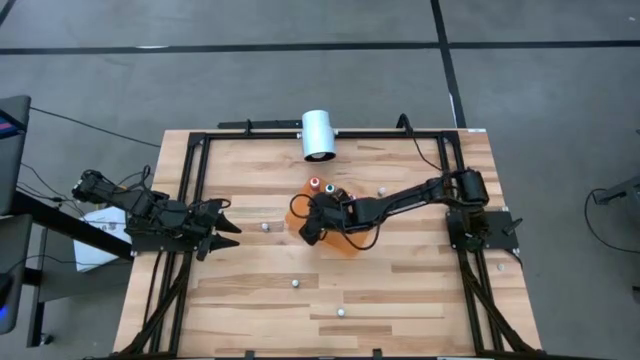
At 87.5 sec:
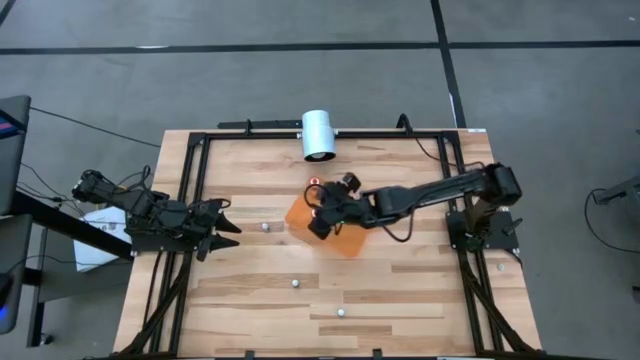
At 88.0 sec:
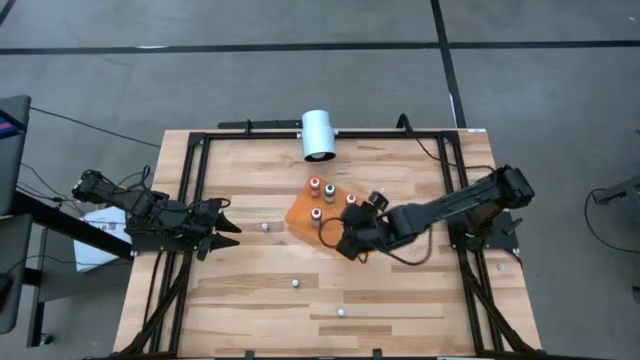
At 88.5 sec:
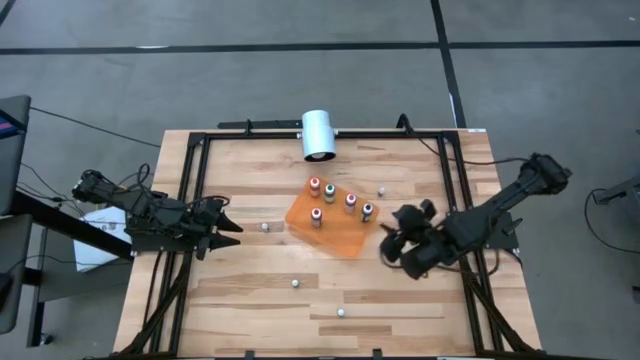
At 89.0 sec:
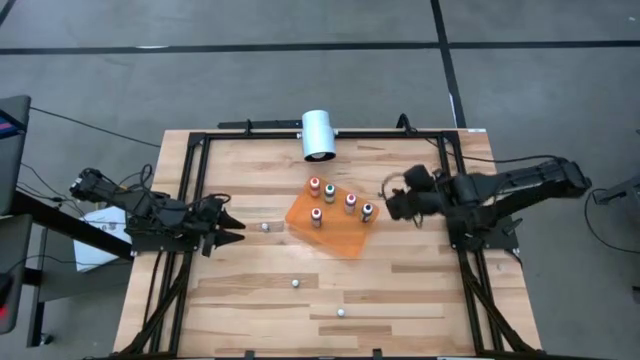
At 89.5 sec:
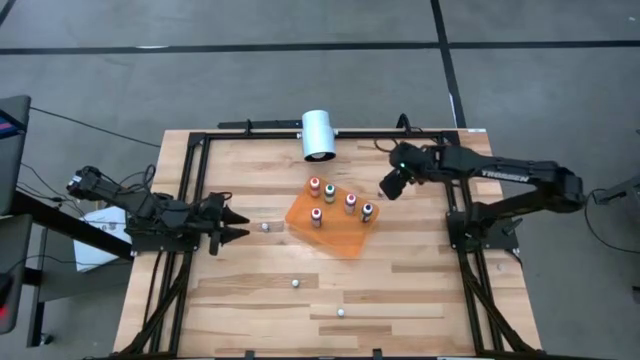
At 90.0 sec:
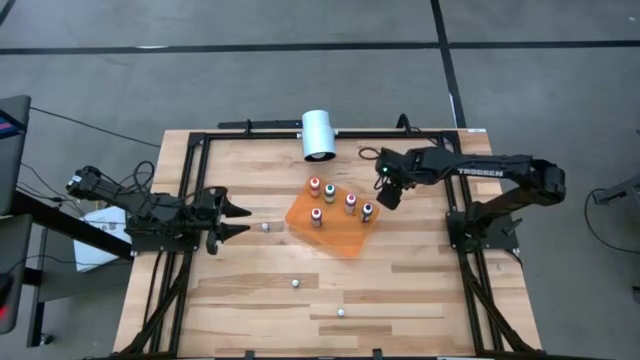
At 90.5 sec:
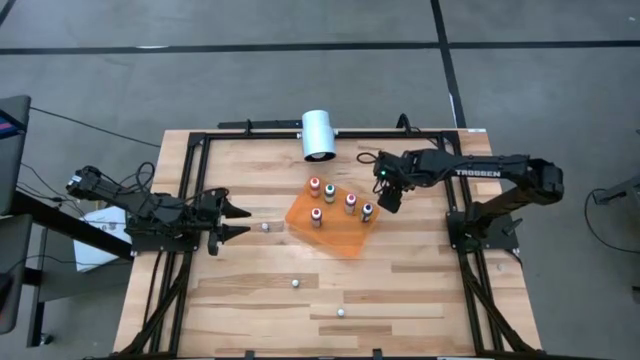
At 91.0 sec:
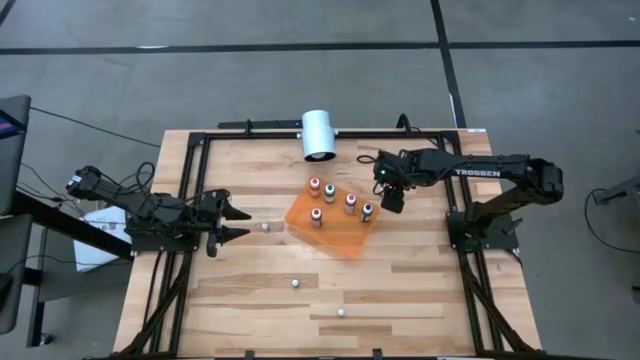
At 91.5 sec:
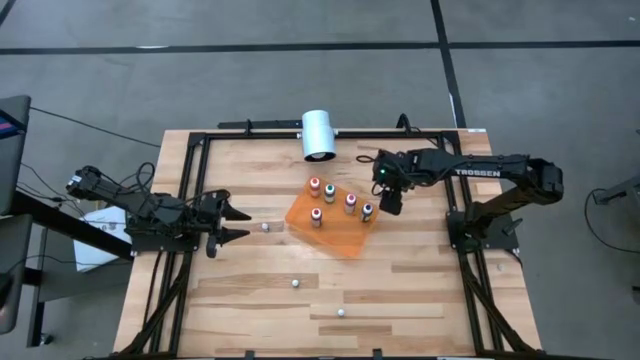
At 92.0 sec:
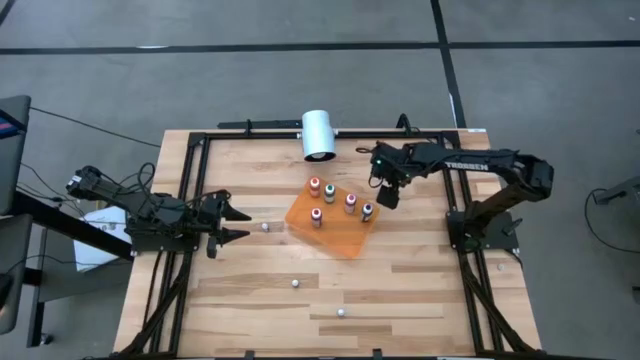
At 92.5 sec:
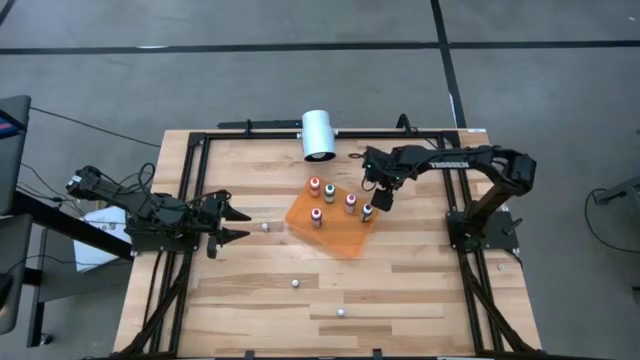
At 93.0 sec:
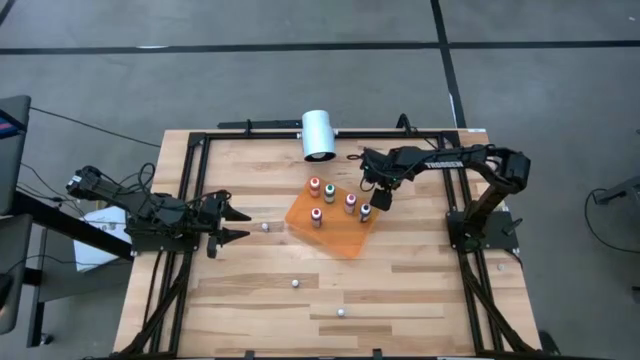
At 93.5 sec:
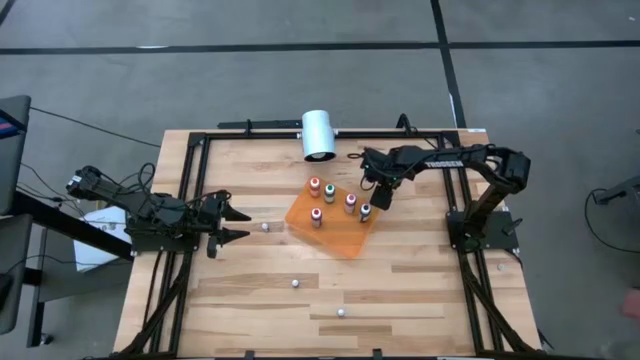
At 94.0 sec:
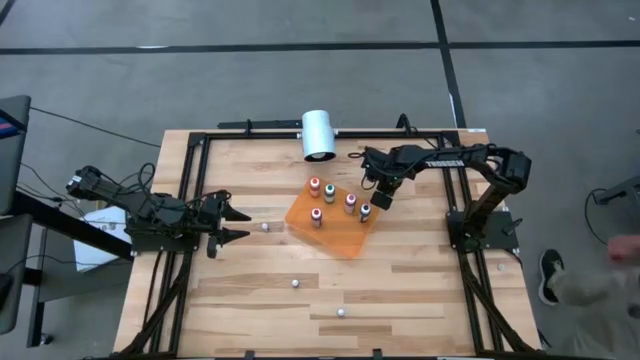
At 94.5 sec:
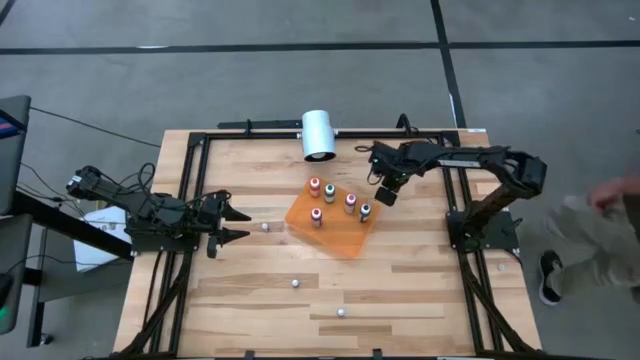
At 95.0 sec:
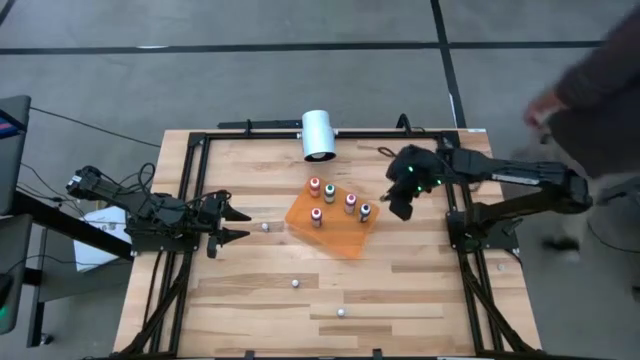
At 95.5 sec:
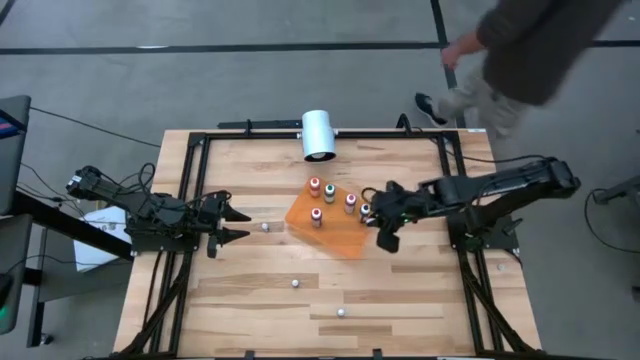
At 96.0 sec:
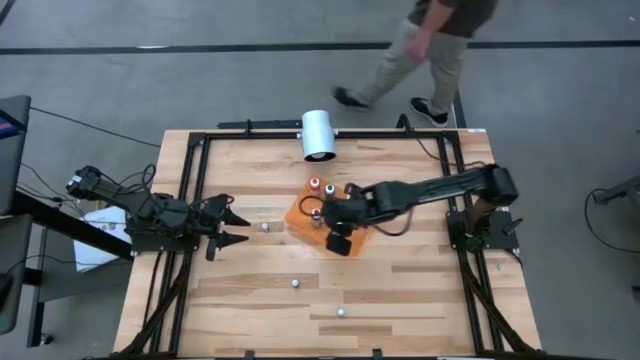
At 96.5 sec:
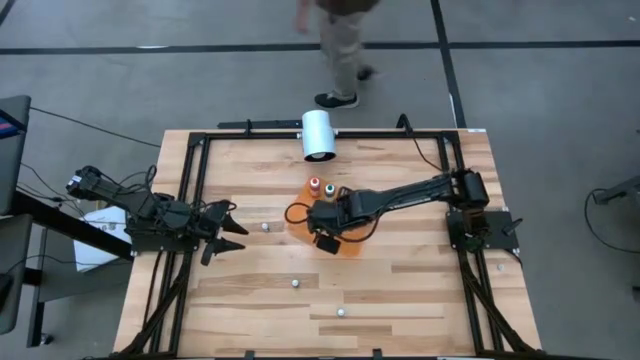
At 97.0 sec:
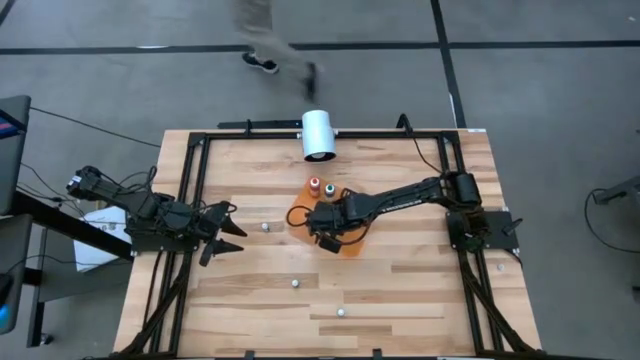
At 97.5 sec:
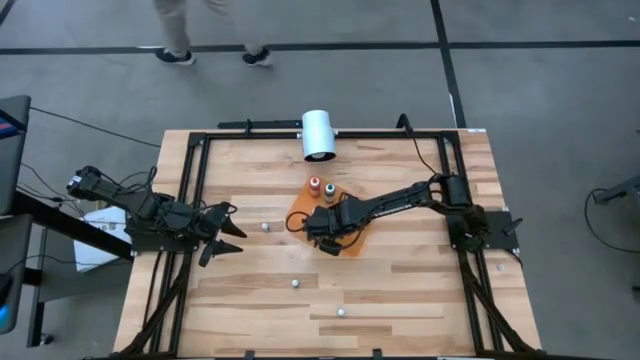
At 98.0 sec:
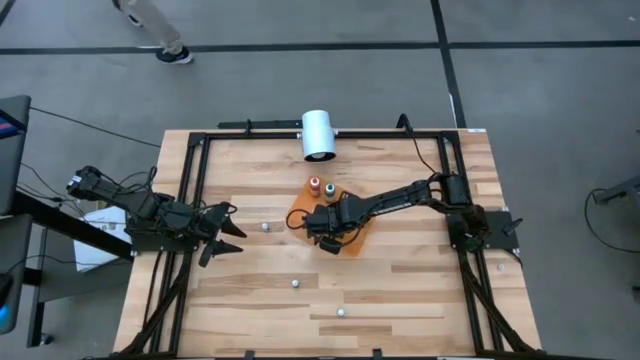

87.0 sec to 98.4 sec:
Task: Pick & Place food coloring
Put the top small green food coloring bottle into the bin

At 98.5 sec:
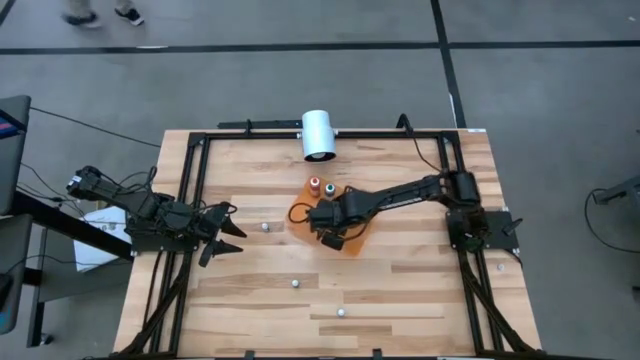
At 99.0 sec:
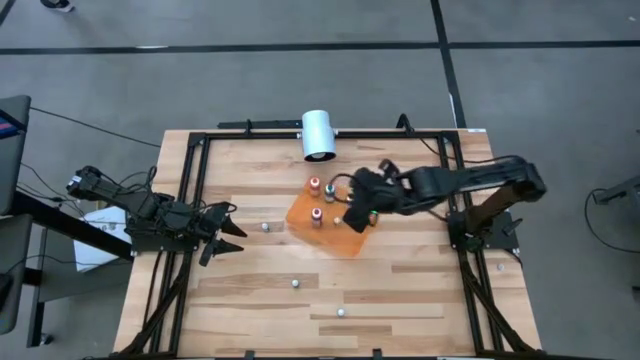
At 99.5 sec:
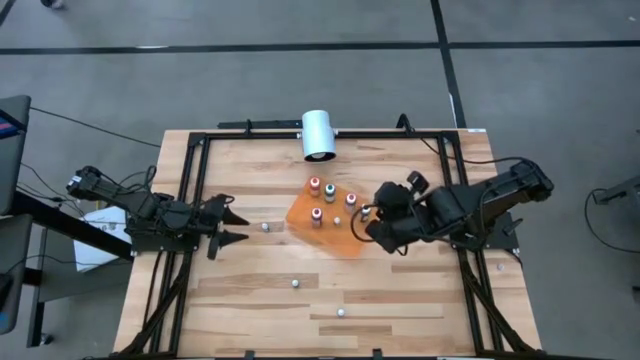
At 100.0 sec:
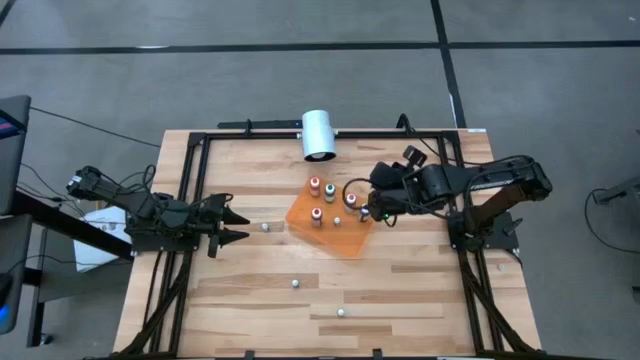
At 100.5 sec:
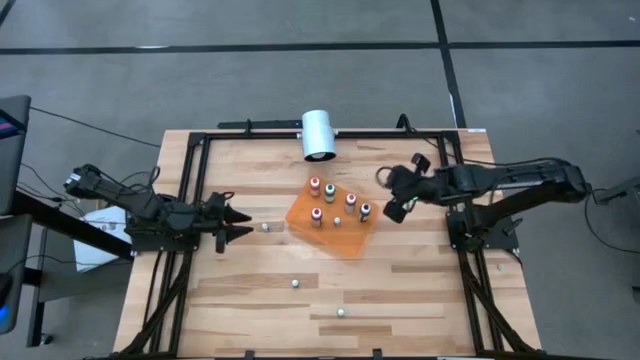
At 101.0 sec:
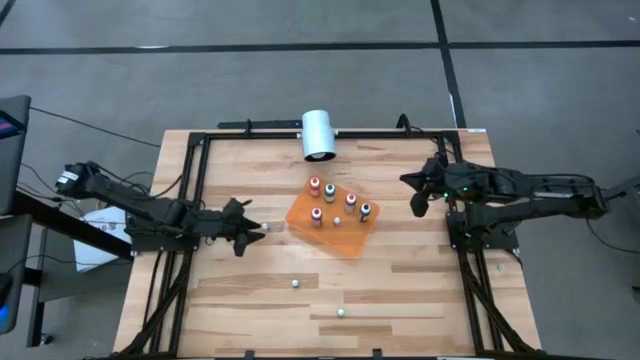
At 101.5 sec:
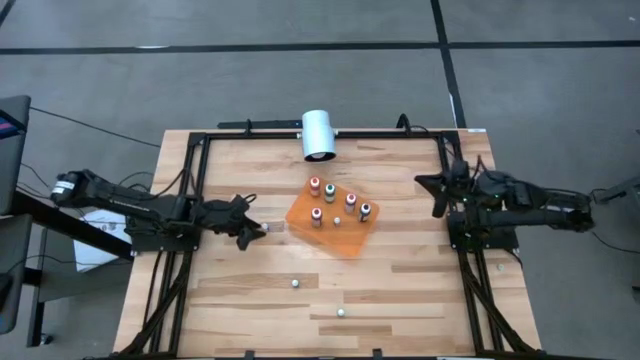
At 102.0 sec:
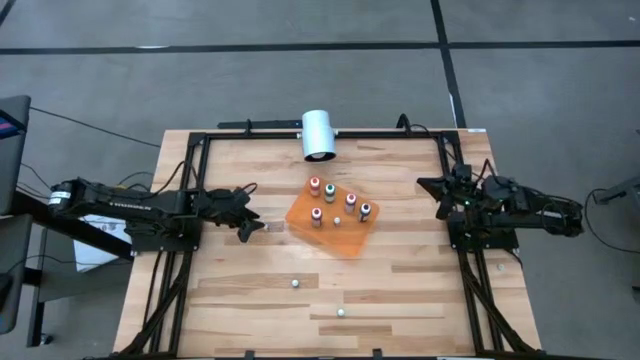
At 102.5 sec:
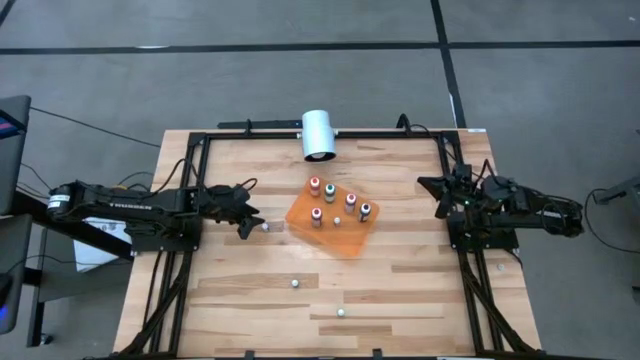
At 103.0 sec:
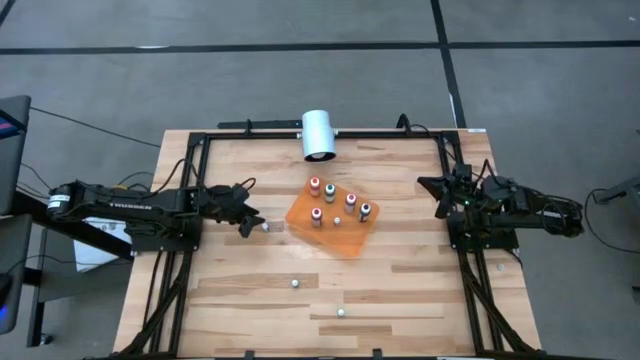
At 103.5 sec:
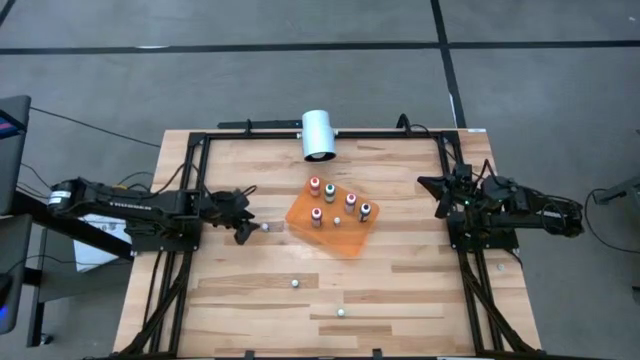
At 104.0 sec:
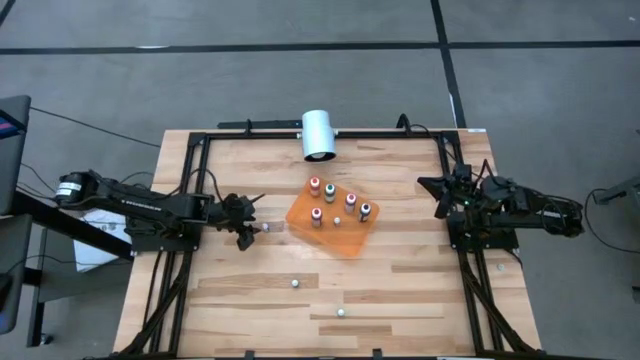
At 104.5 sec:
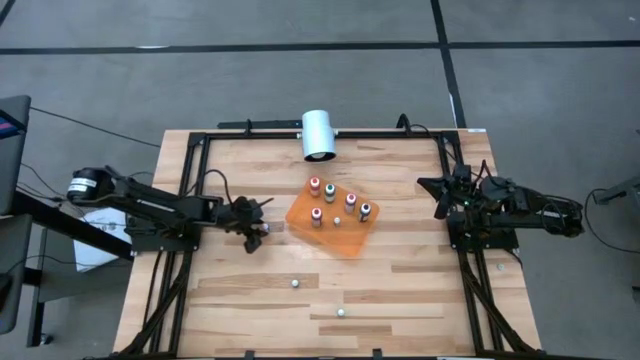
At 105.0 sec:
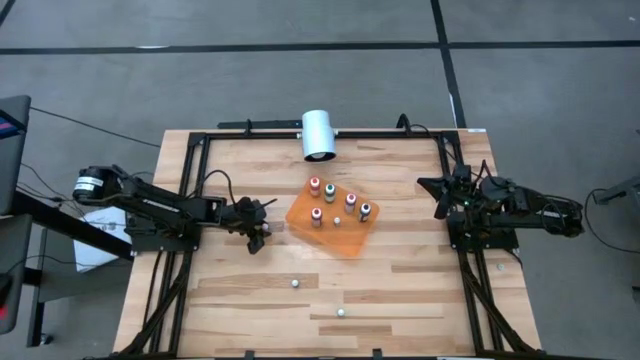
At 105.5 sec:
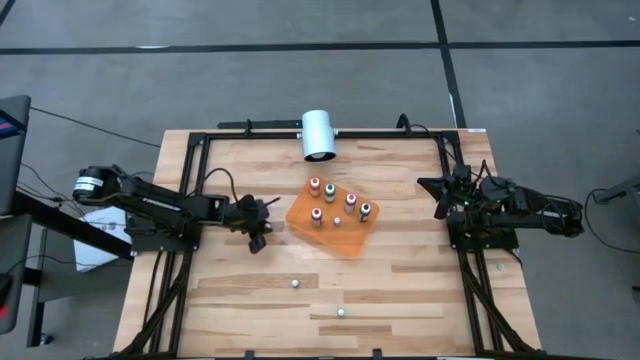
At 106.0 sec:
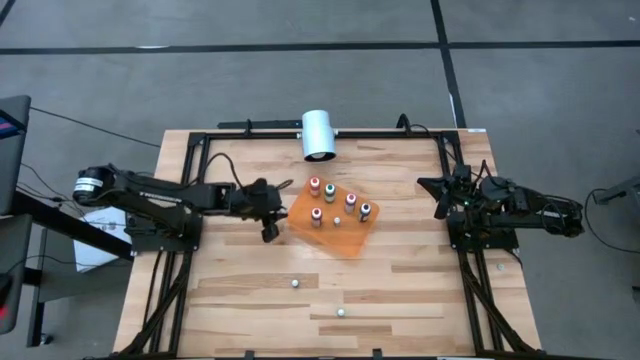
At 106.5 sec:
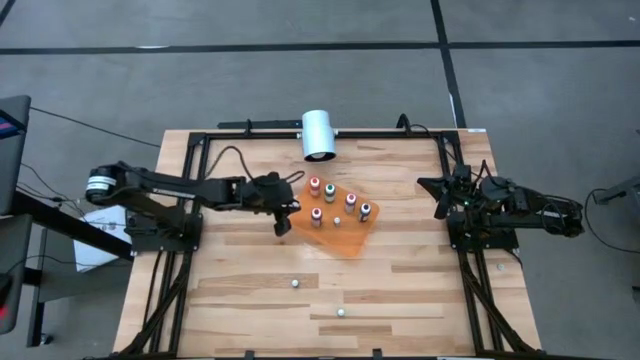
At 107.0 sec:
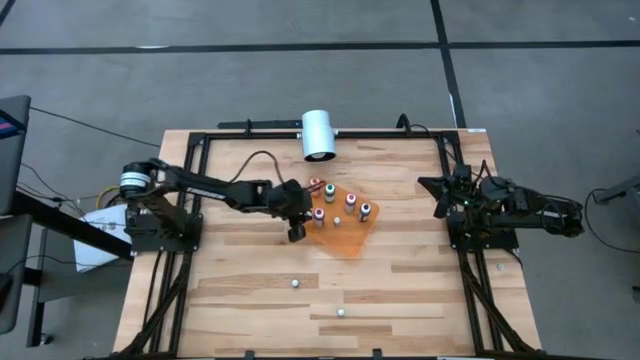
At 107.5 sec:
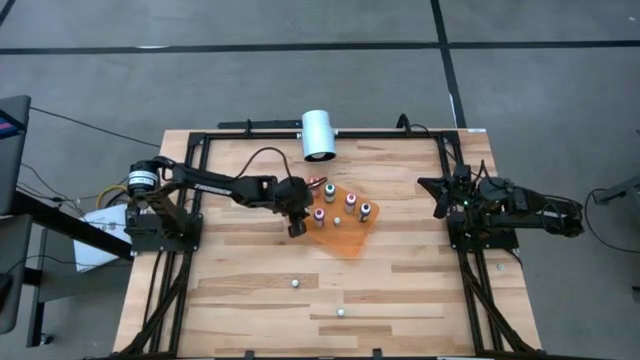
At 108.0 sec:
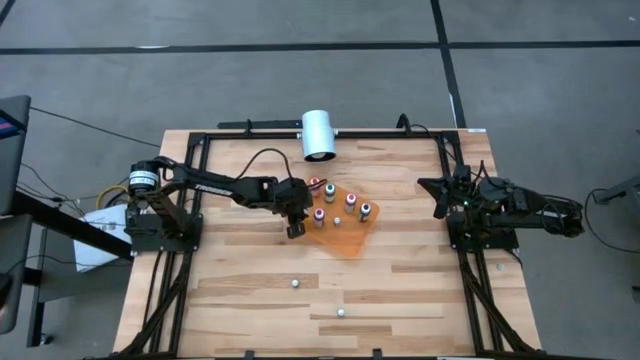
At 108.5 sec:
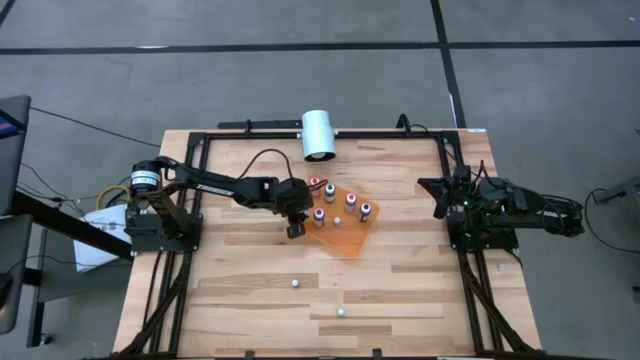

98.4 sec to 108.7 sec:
Put the blue food coloring bottle into the bin
